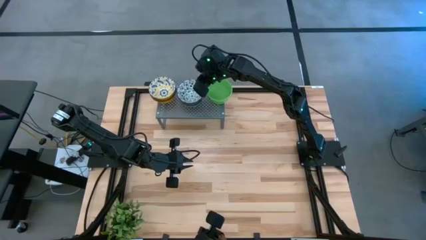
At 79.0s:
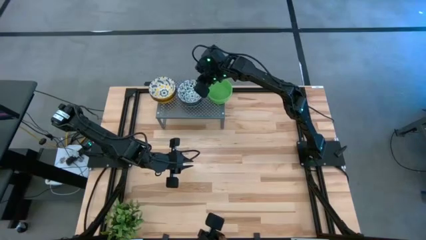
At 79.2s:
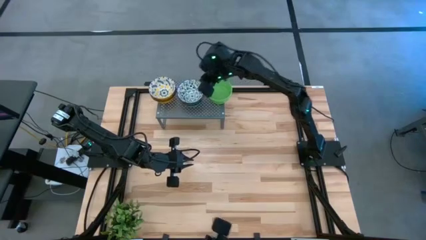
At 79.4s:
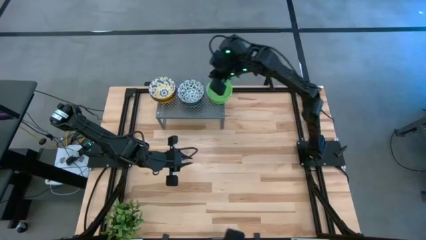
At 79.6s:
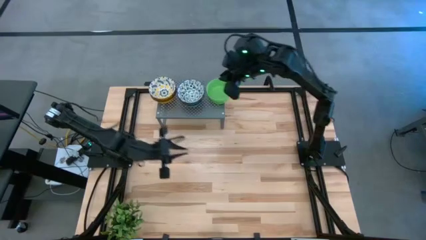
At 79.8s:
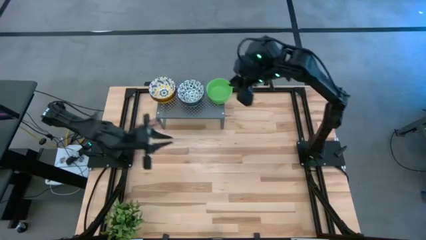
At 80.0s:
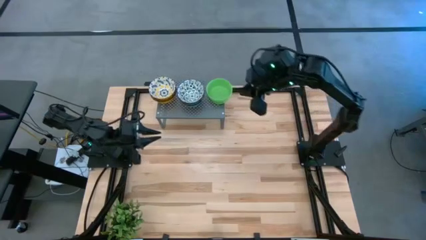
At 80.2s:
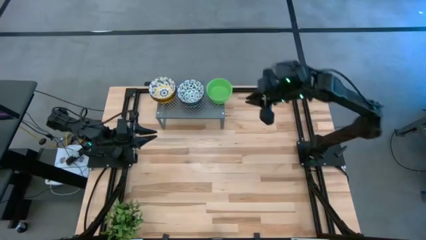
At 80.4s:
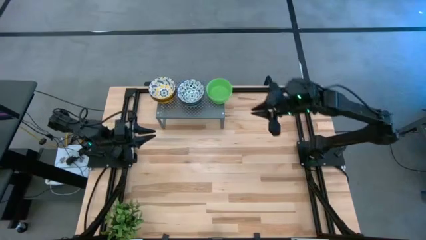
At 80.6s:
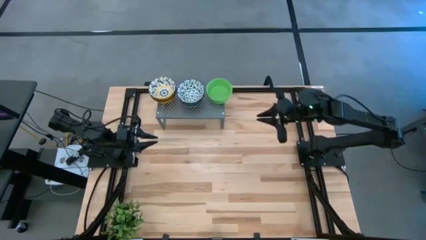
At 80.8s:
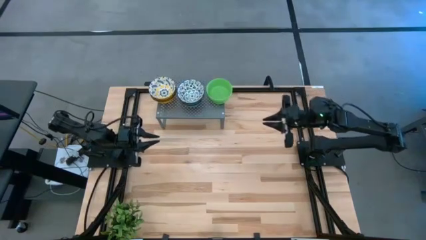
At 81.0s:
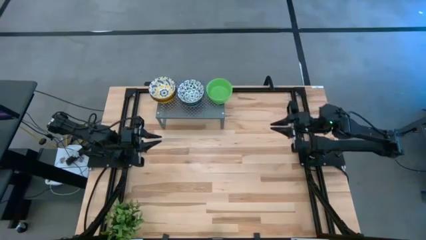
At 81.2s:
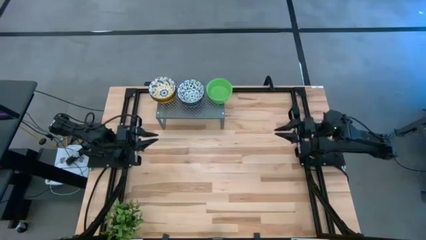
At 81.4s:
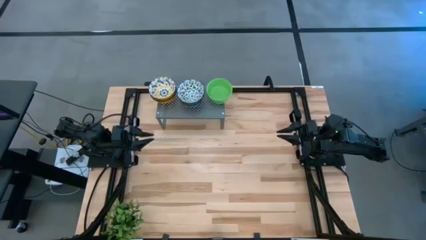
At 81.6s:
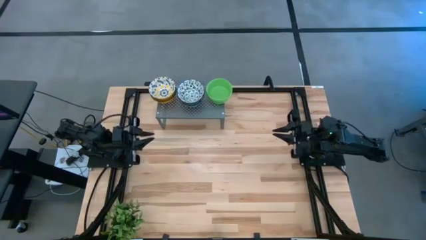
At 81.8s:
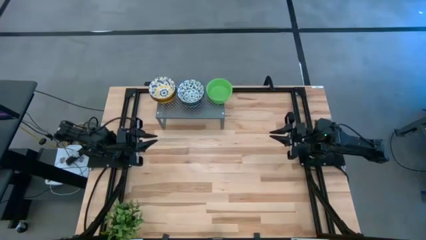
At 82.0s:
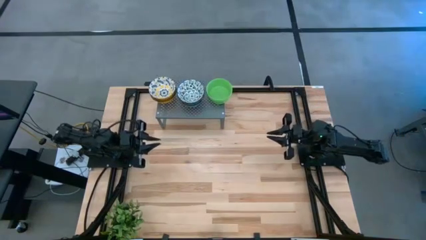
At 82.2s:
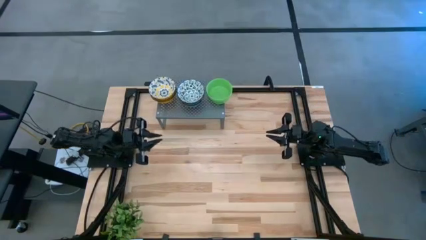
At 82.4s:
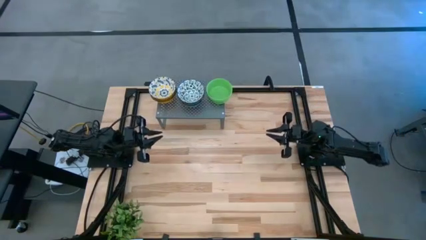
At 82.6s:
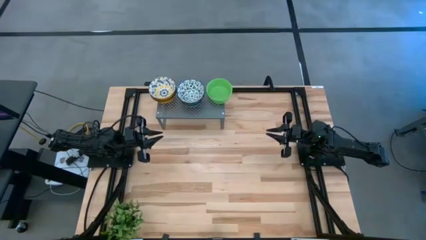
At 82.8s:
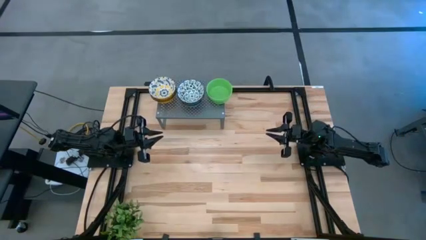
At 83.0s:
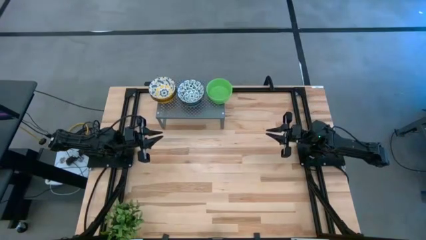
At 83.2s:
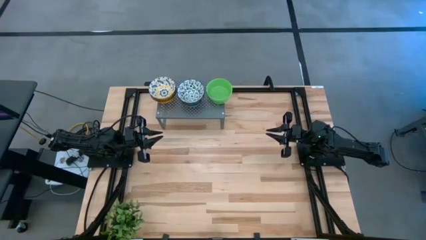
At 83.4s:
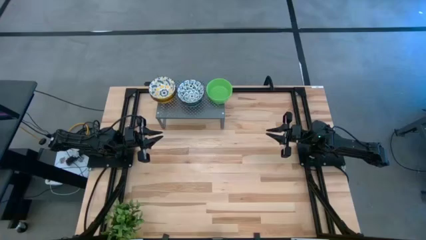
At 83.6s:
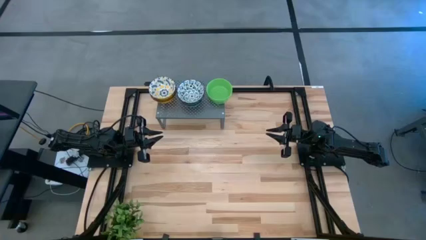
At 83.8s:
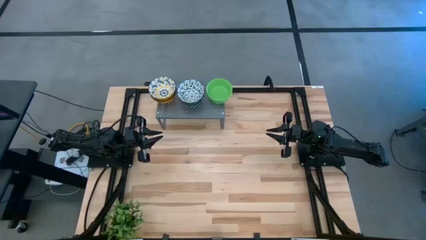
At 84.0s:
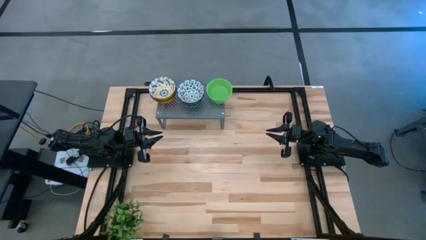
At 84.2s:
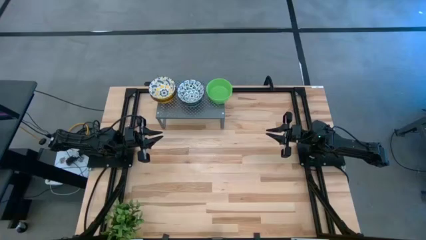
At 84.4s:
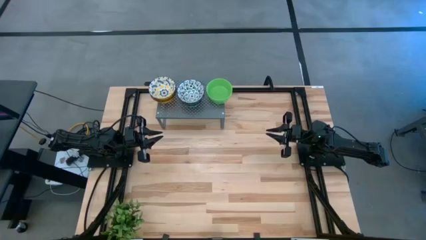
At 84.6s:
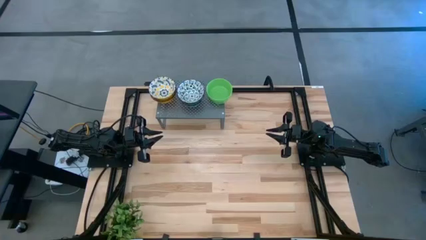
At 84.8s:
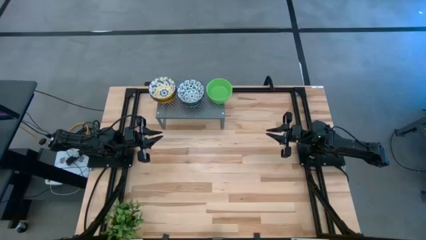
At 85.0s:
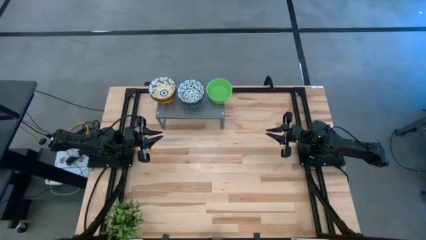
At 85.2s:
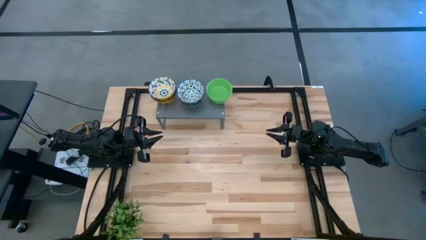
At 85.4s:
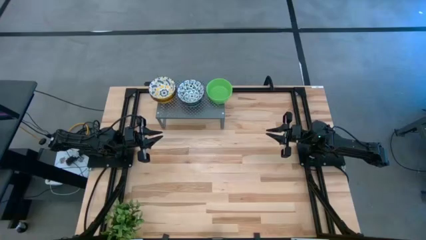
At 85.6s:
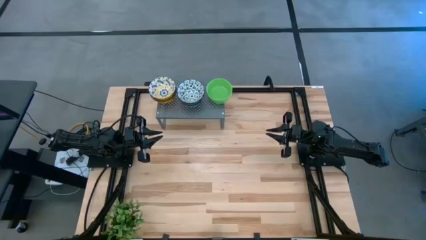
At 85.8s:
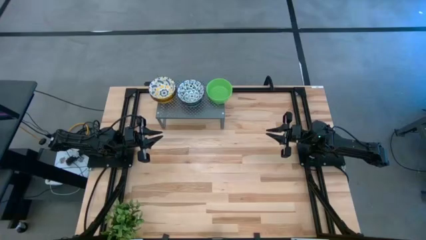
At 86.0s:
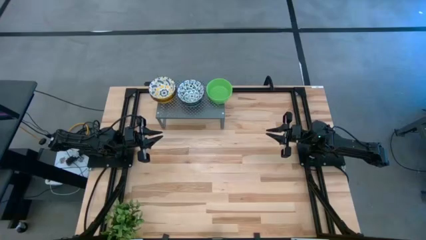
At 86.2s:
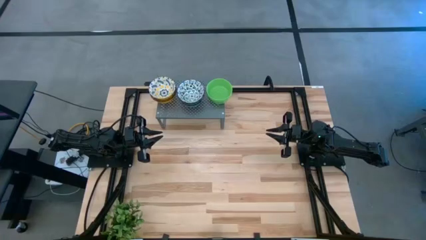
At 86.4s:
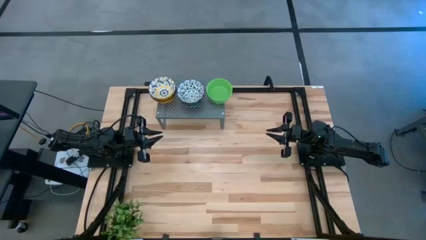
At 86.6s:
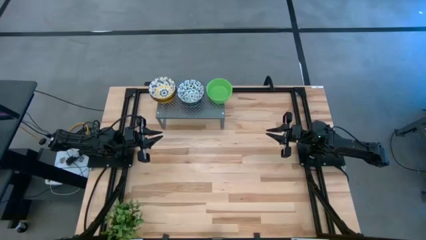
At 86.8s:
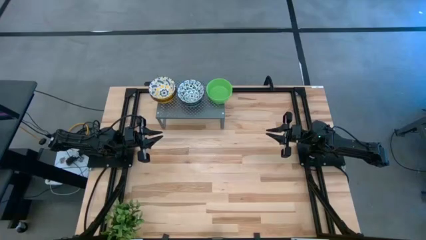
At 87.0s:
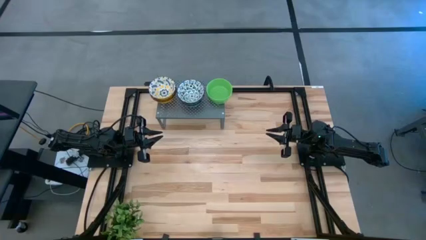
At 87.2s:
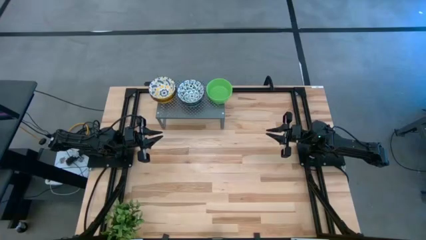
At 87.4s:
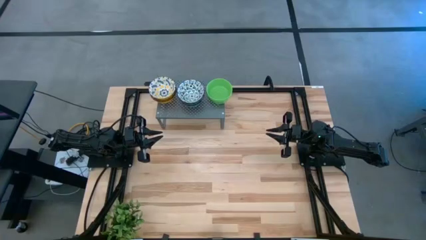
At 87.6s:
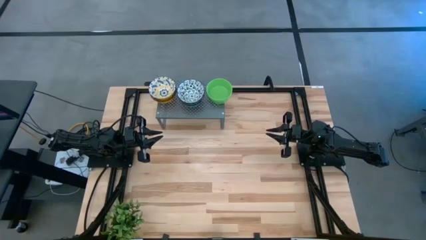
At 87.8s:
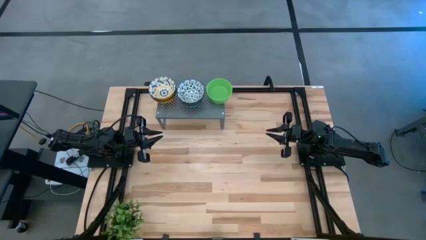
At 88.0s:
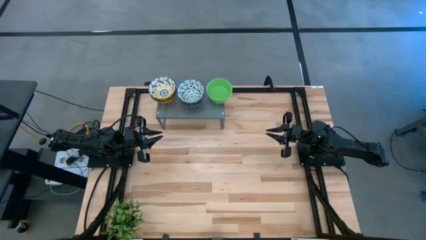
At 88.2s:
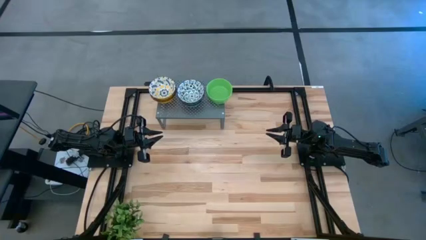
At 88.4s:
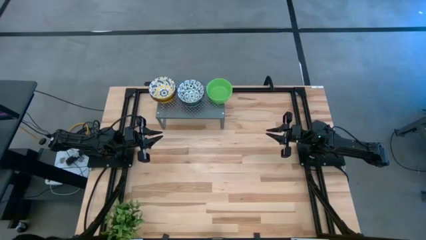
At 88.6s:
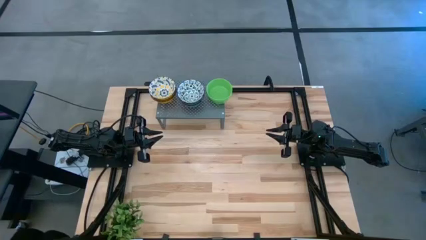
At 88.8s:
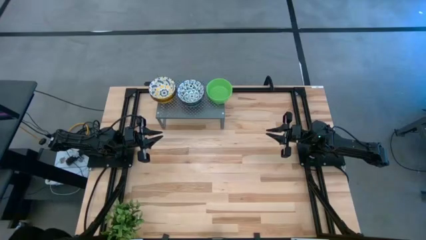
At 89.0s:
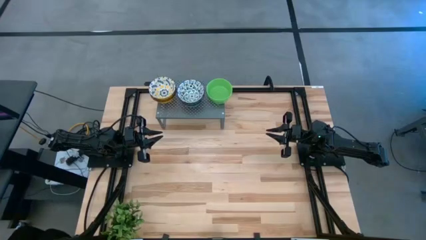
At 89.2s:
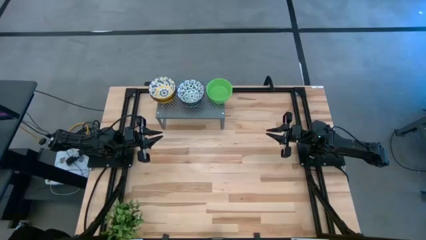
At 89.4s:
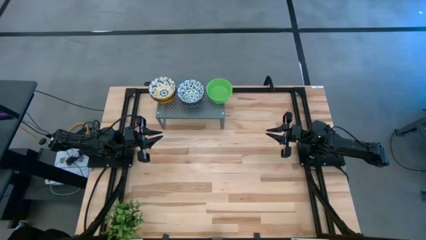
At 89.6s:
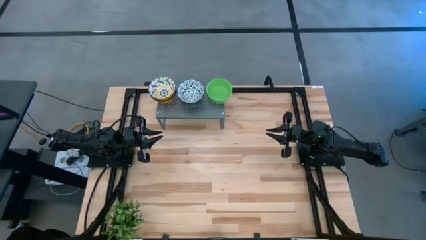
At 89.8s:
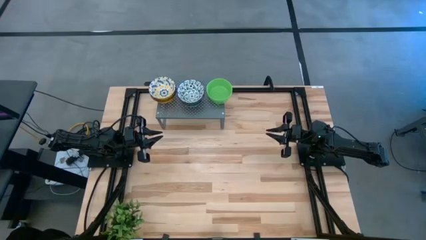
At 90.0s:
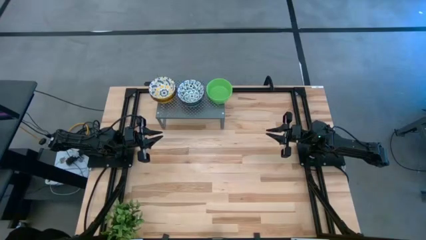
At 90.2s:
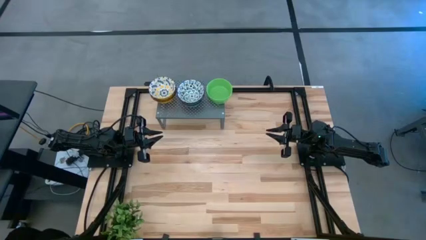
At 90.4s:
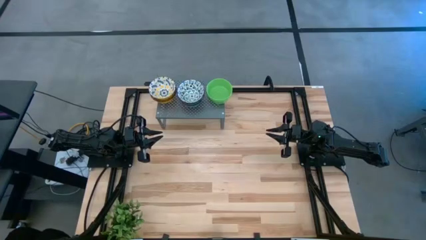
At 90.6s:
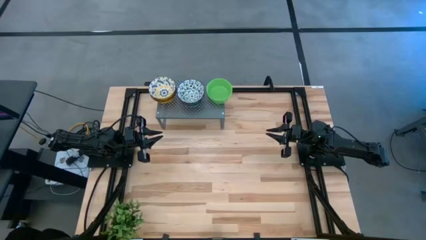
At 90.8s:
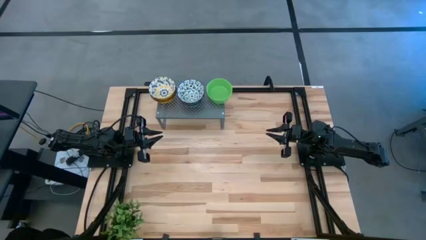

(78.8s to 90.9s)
Task: Pick & Place Mini bowls
Return to Home Position

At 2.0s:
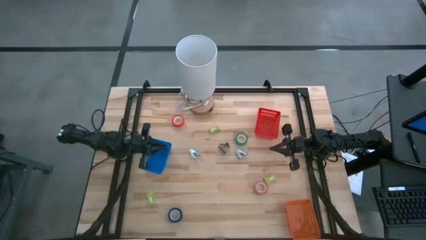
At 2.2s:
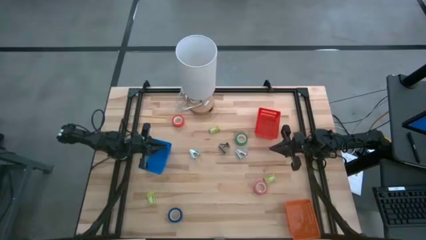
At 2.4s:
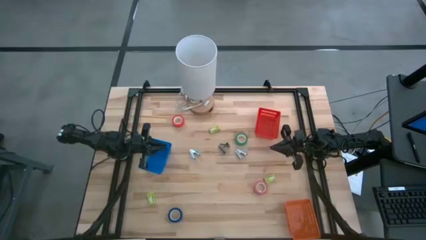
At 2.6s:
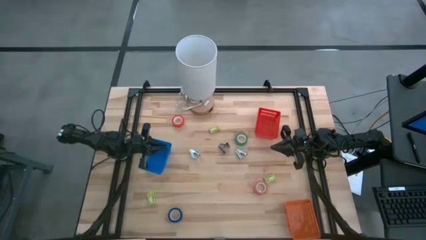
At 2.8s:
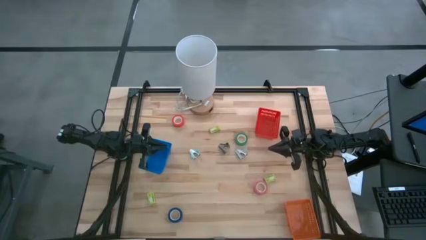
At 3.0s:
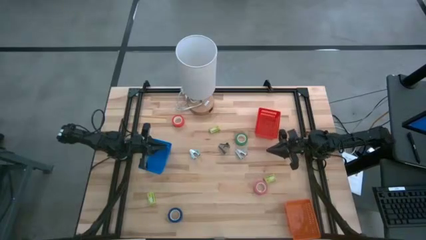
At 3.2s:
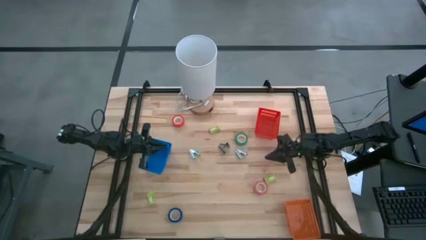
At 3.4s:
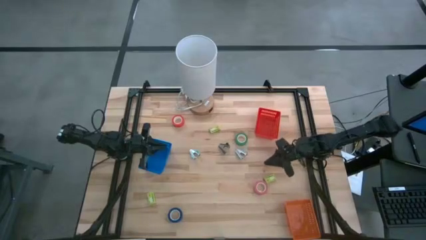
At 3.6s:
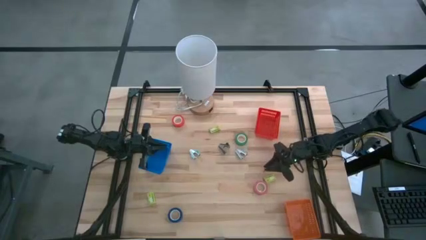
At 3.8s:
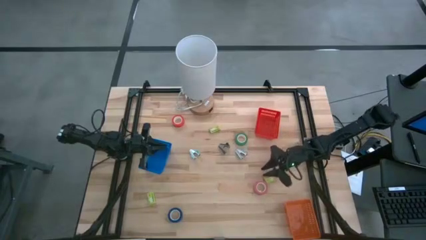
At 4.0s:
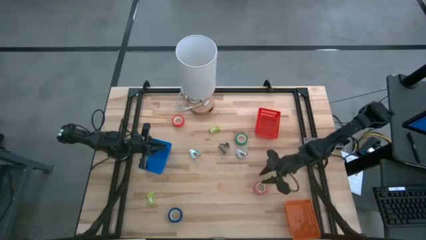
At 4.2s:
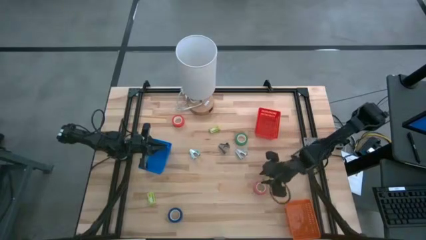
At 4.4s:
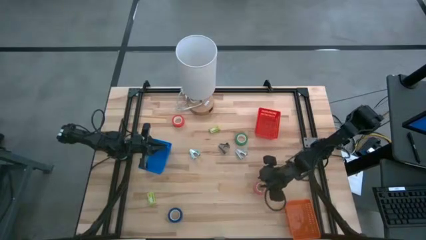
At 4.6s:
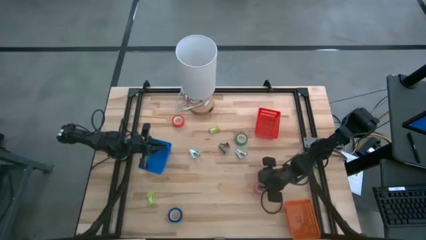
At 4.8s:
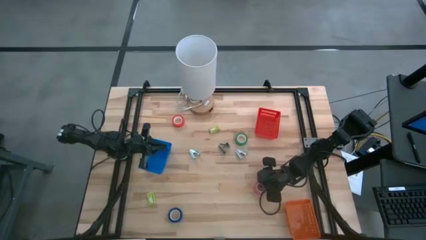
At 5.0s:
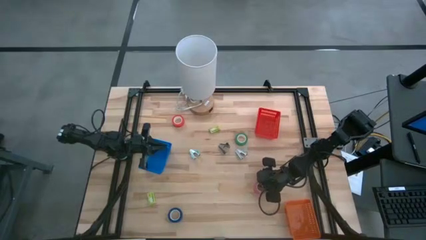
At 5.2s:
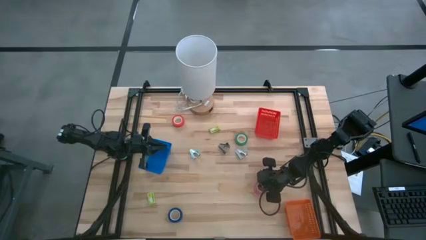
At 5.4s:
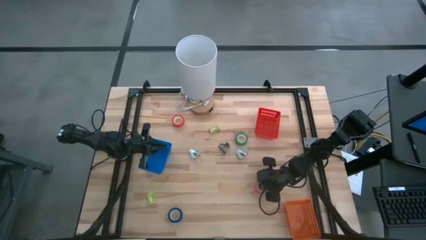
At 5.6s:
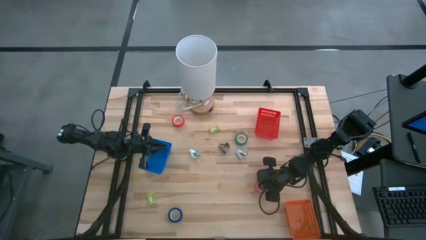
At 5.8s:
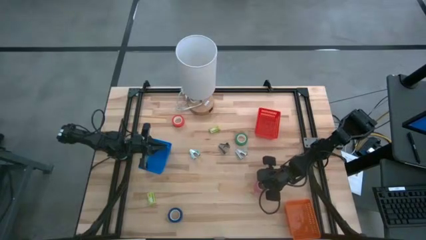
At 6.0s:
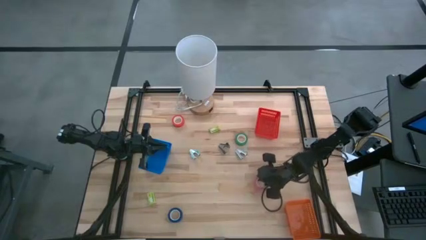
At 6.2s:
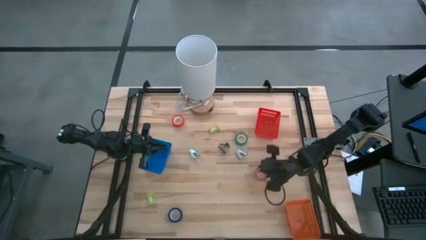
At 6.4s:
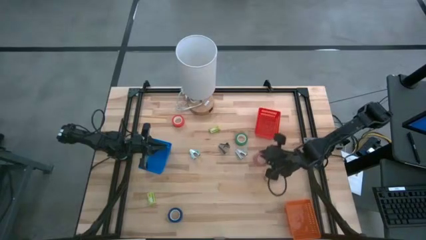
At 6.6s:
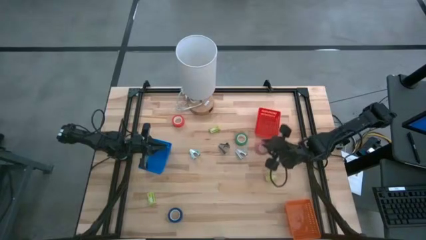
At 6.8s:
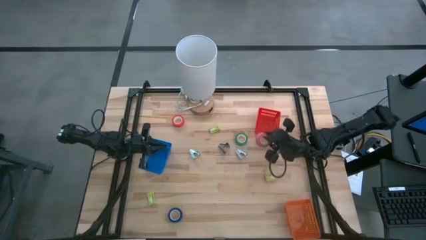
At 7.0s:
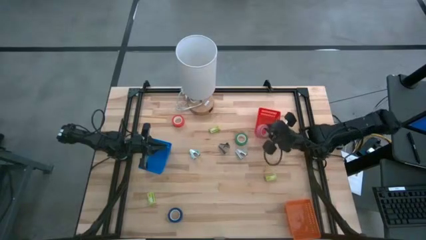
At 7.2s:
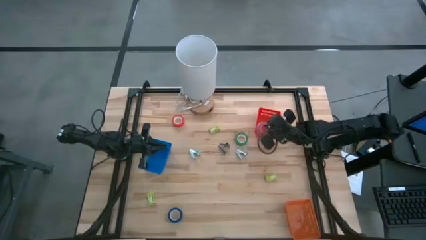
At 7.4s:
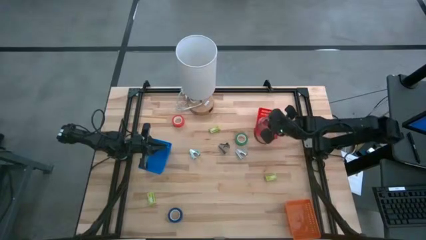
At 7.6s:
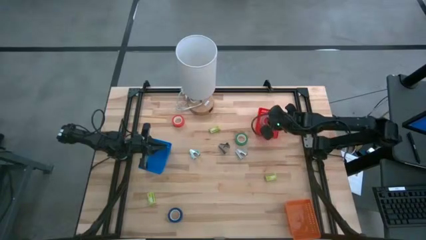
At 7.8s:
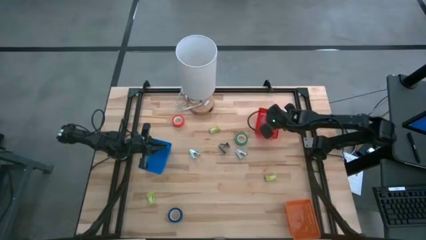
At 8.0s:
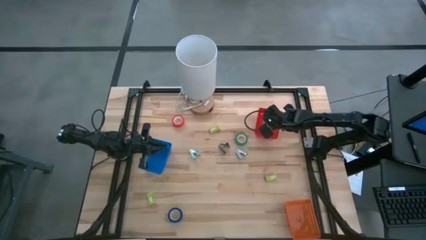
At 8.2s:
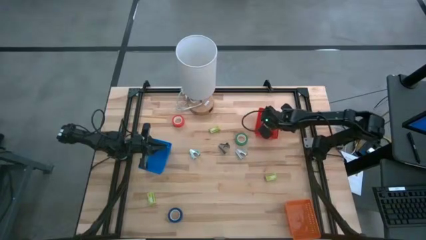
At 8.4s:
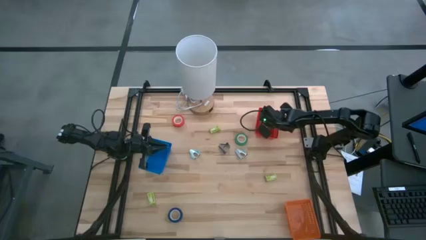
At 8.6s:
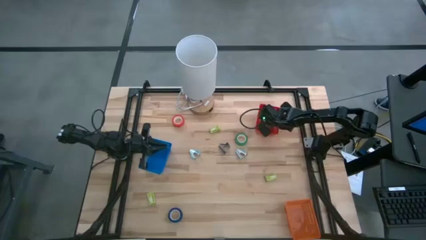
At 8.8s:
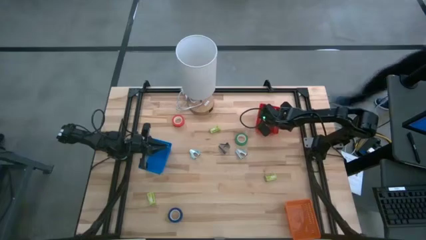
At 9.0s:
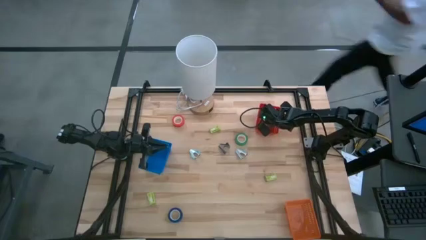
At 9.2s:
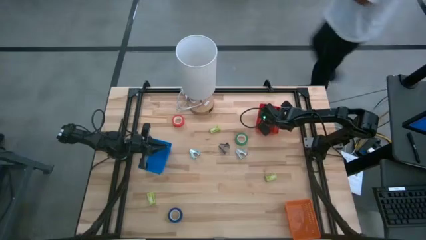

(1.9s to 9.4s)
Task: Pick and place Stapler, Stapler remover, tape
Put the pink tape into the red bin
